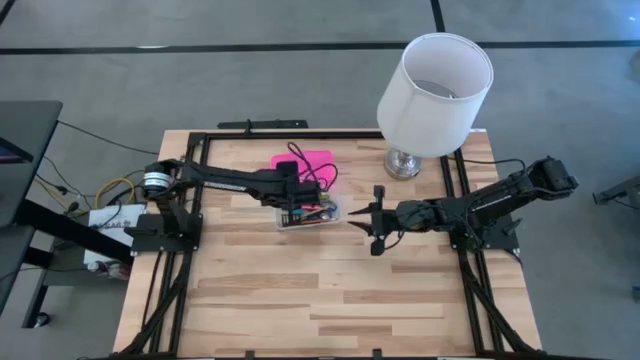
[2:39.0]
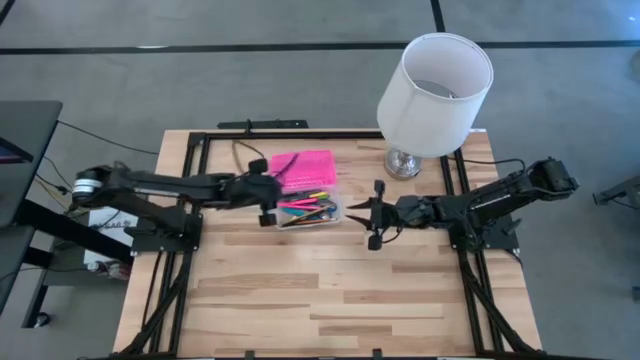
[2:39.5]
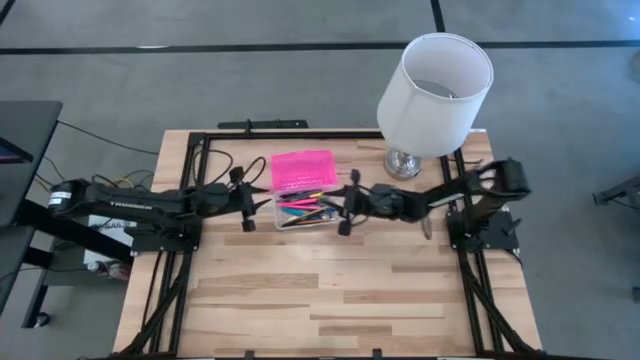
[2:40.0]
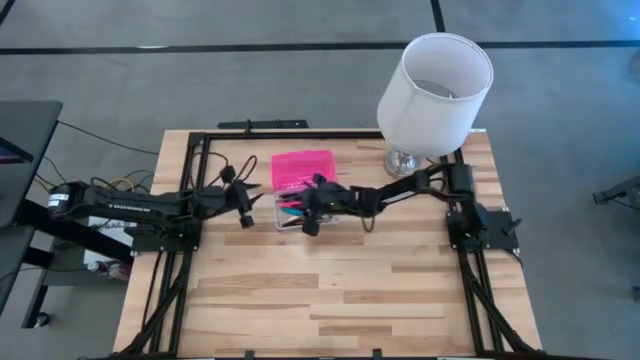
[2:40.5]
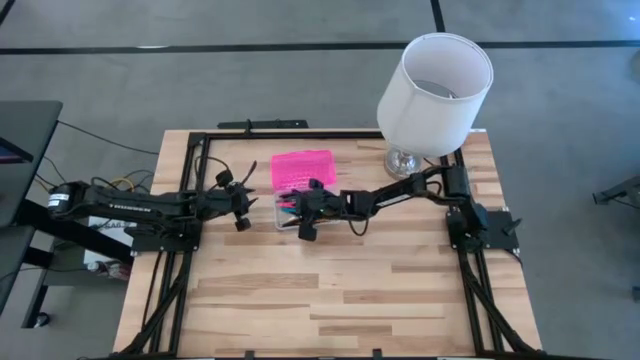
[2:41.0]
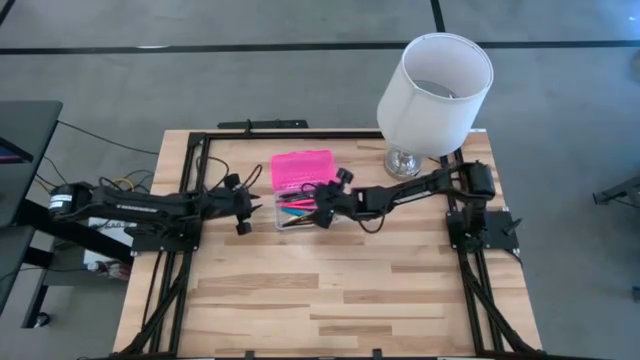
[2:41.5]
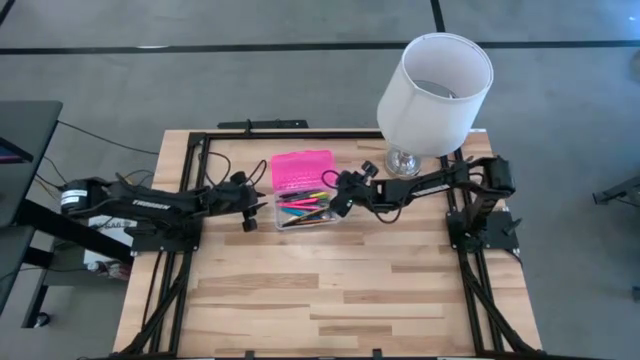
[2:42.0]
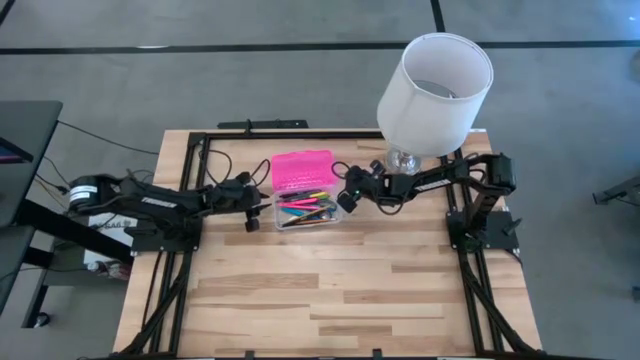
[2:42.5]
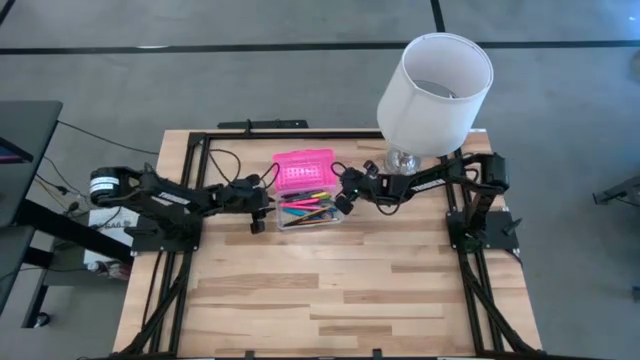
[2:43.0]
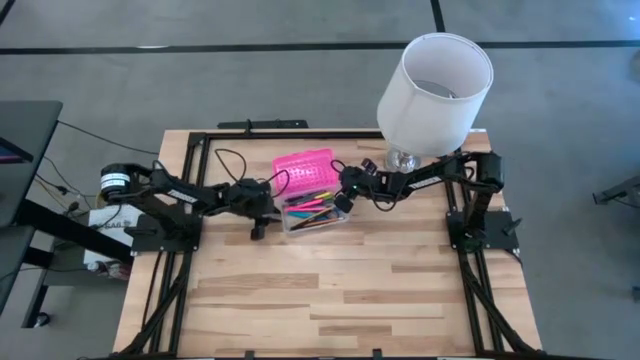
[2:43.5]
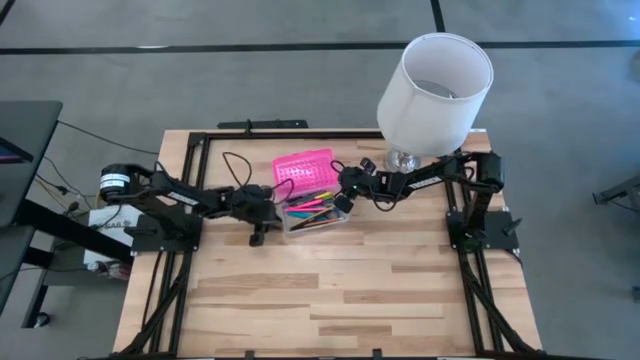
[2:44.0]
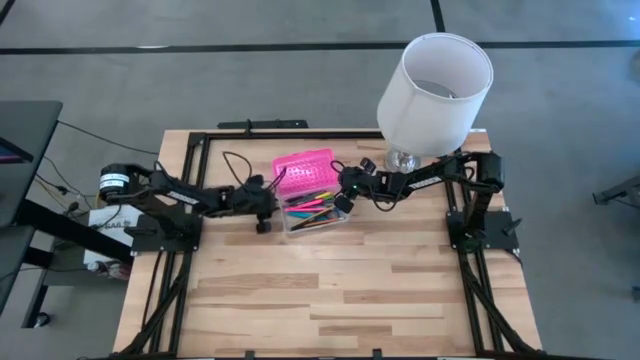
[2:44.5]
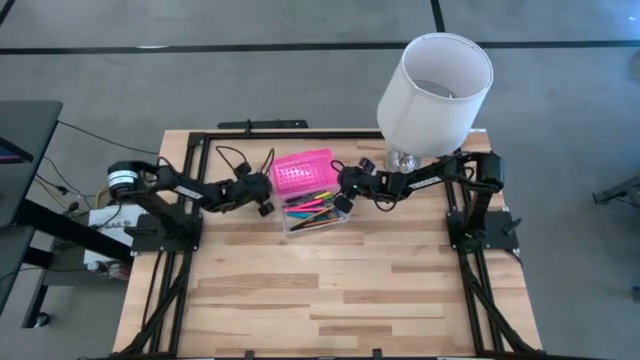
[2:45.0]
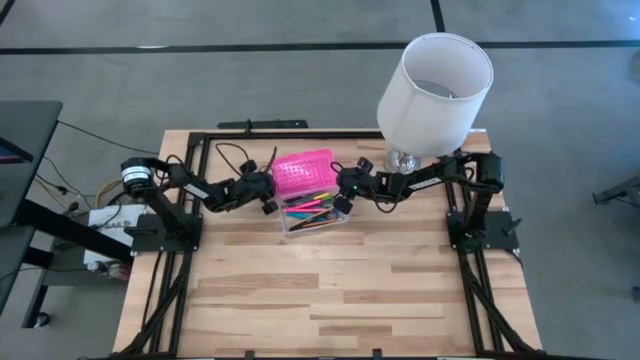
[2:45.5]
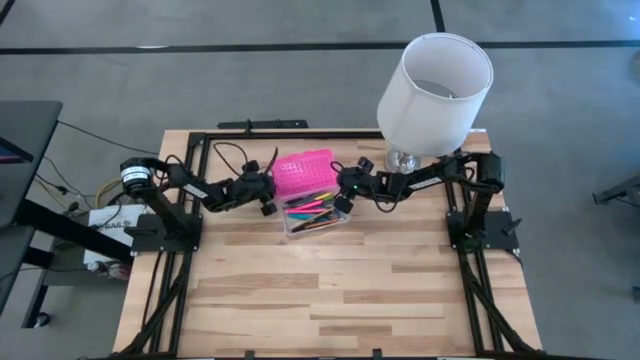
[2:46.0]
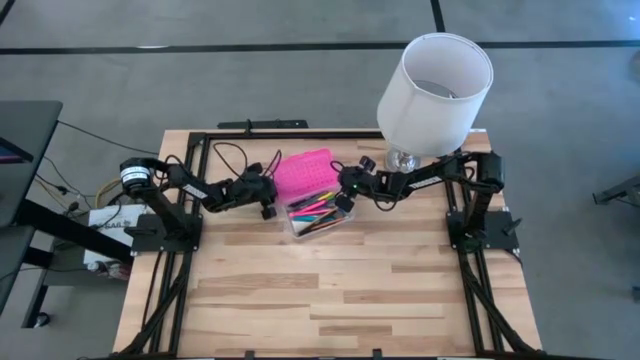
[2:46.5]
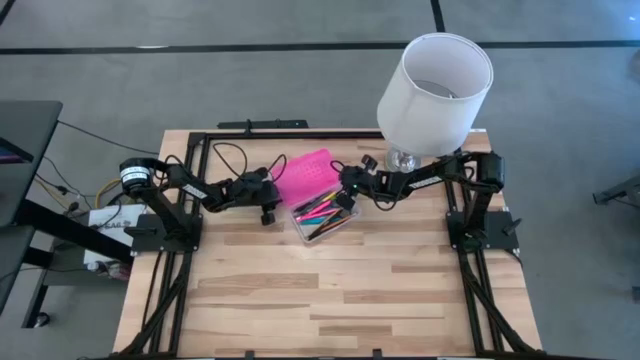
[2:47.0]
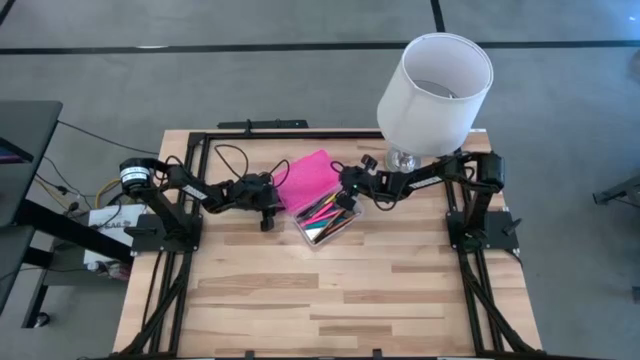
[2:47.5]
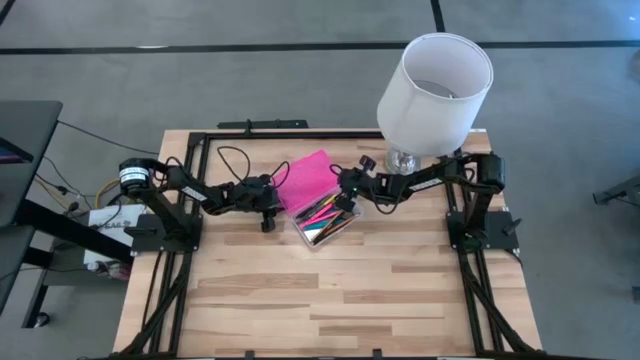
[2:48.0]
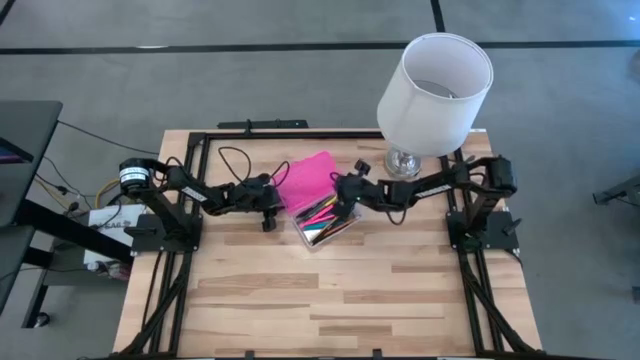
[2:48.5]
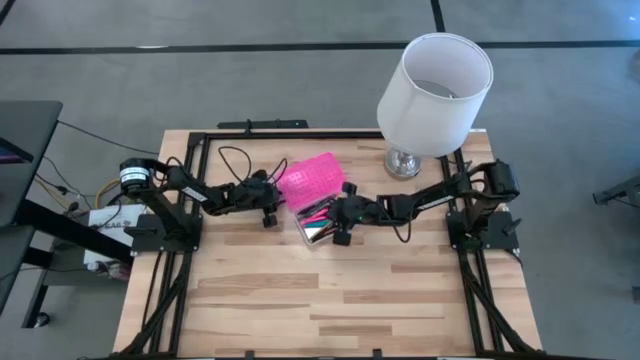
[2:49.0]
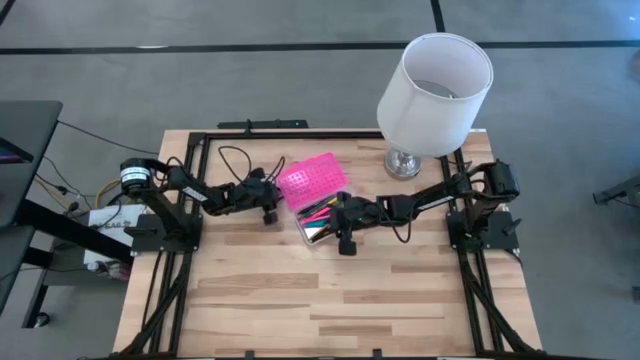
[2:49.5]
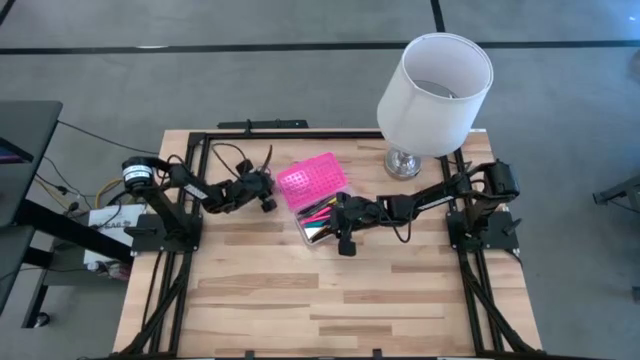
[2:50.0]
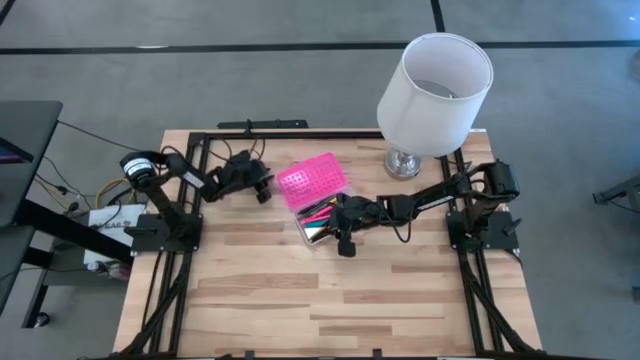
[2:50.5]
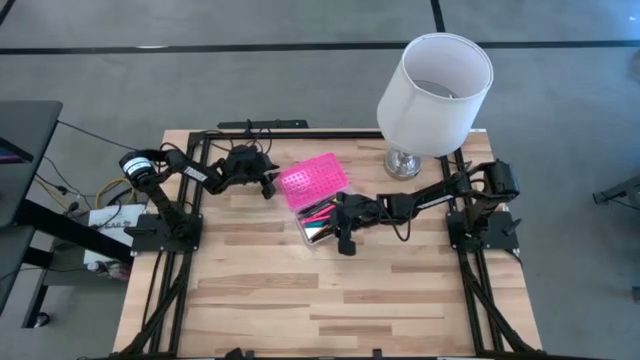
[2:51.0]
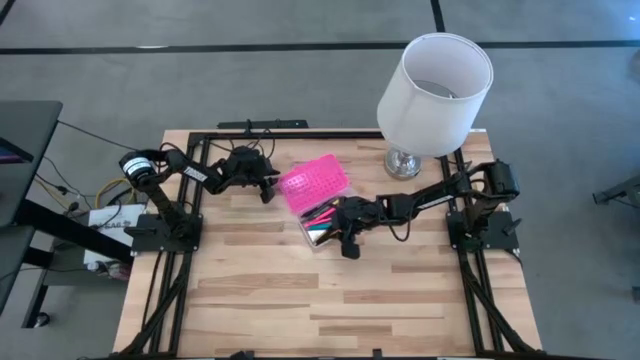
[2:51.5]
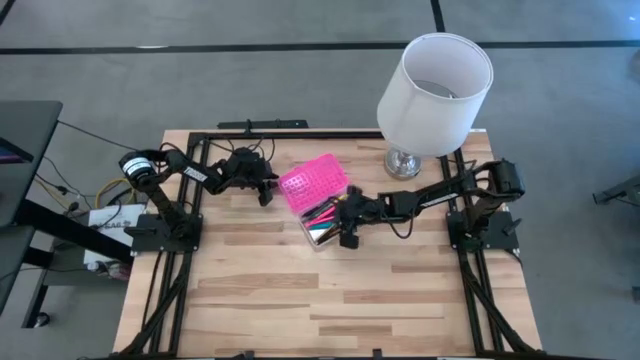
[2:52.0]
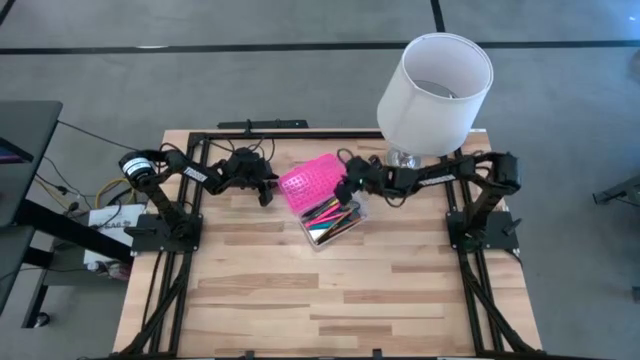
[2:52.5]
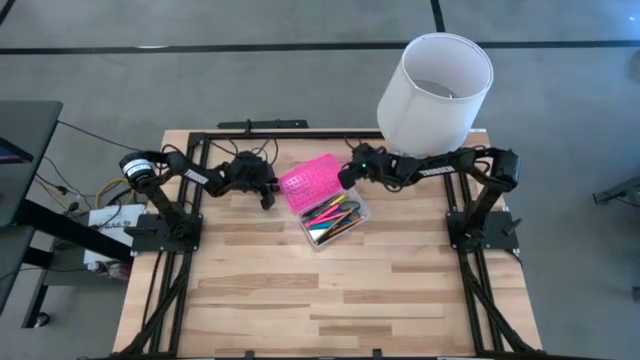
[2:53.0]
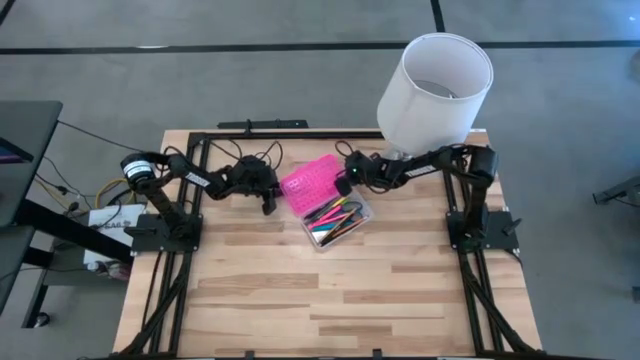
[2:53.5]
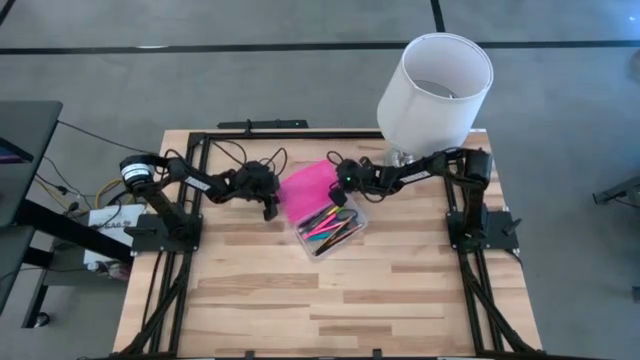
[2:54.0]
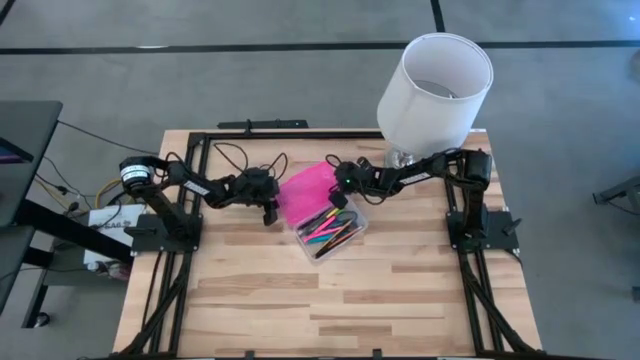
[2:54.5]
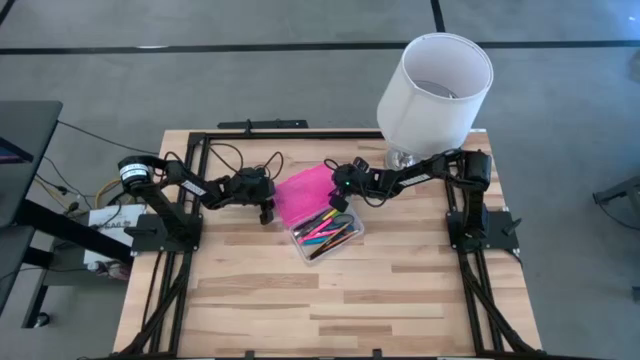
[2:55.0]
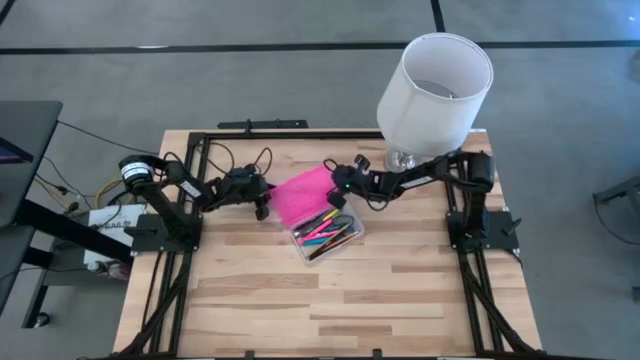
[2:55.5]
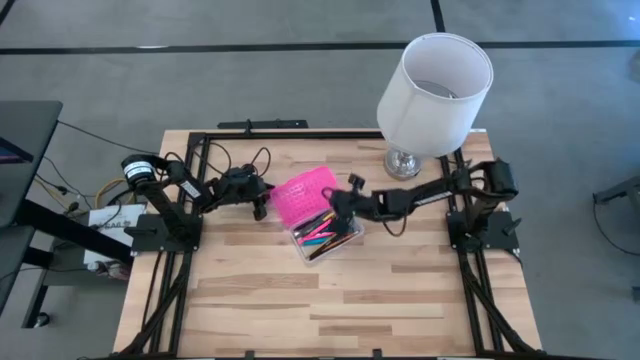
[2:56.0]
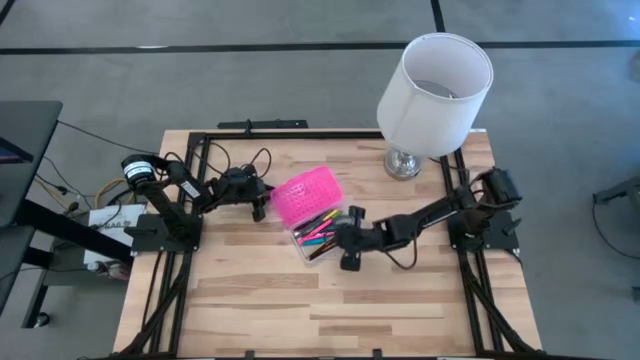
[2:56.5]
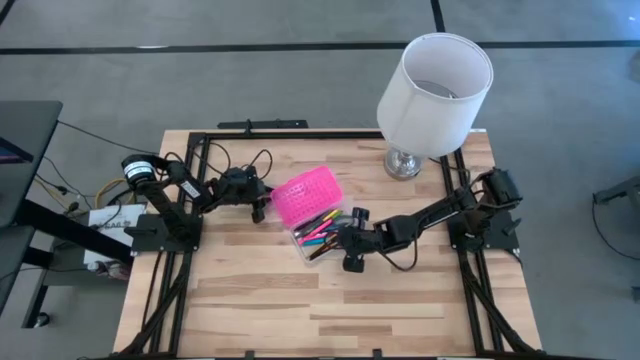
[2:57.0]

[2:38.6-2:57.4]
Task: Pick & place school supplies into a supply box
Close the pink supply box

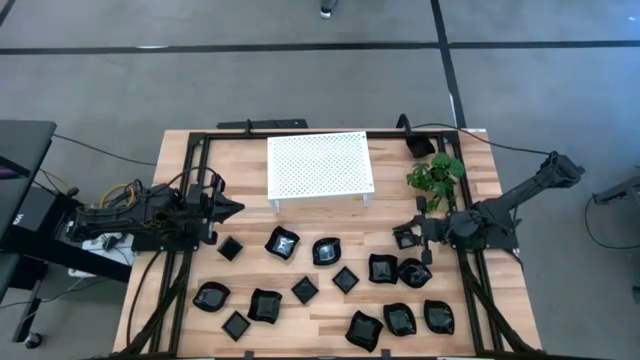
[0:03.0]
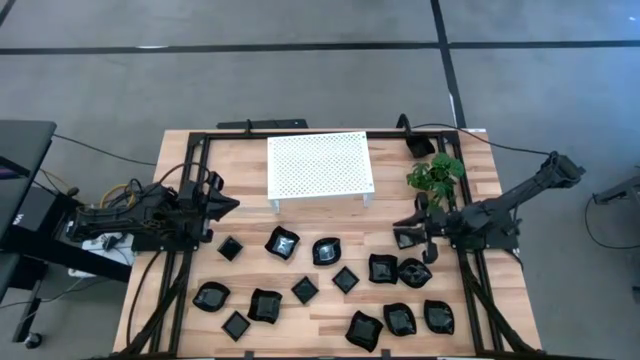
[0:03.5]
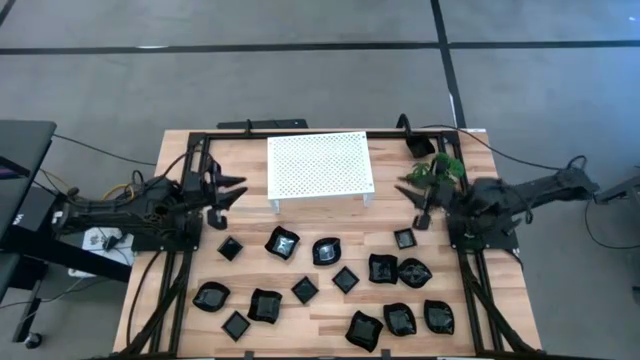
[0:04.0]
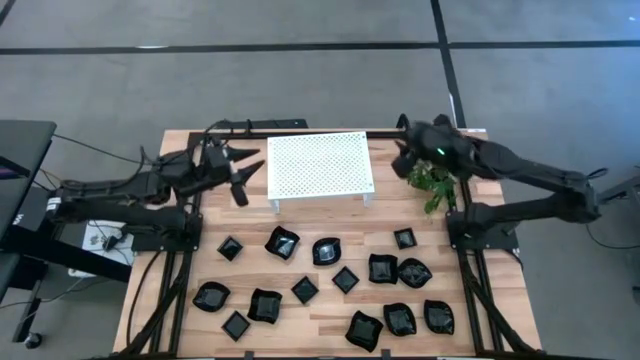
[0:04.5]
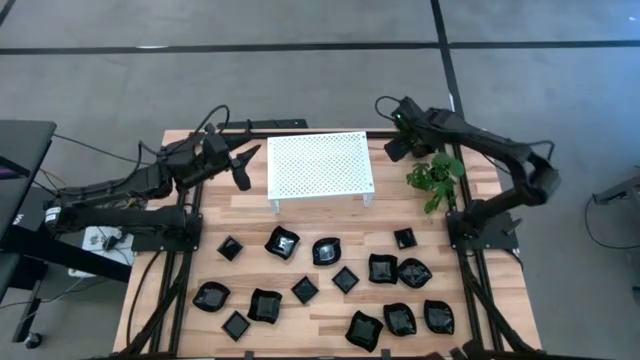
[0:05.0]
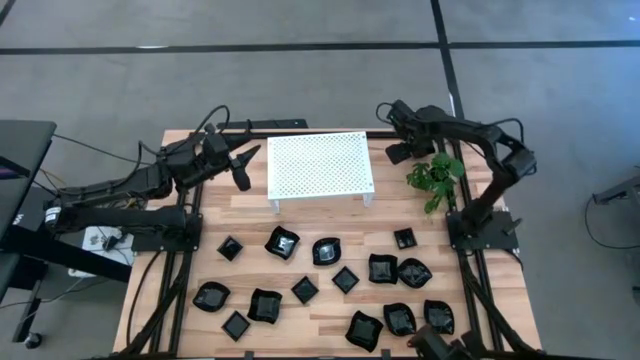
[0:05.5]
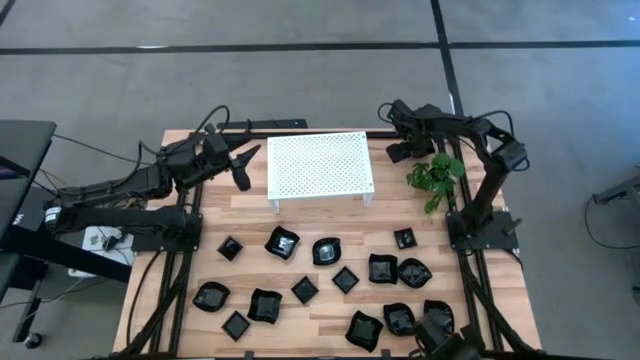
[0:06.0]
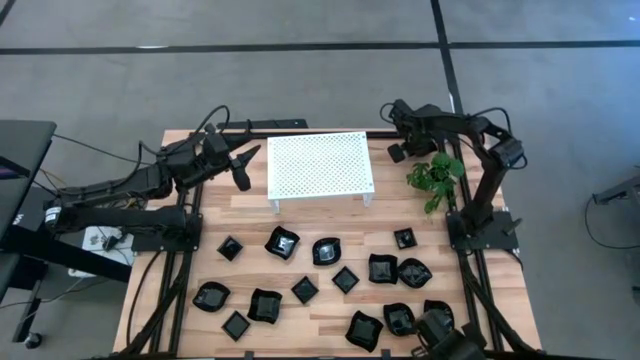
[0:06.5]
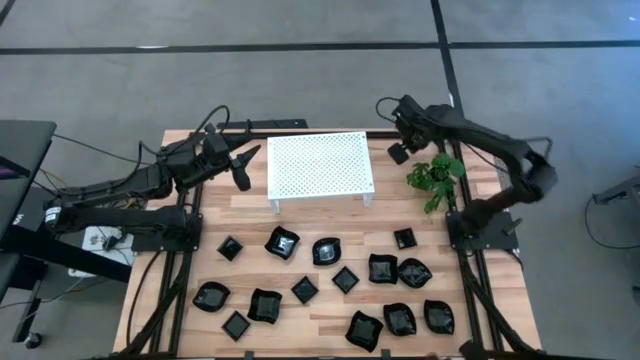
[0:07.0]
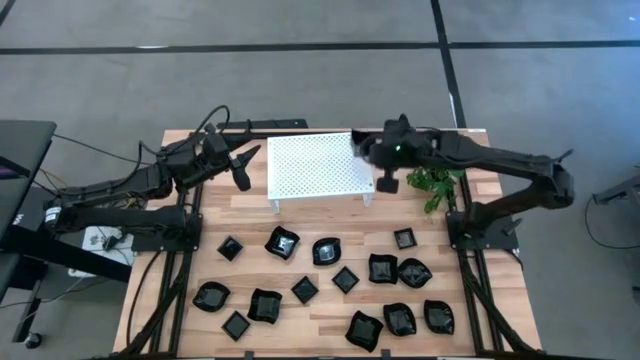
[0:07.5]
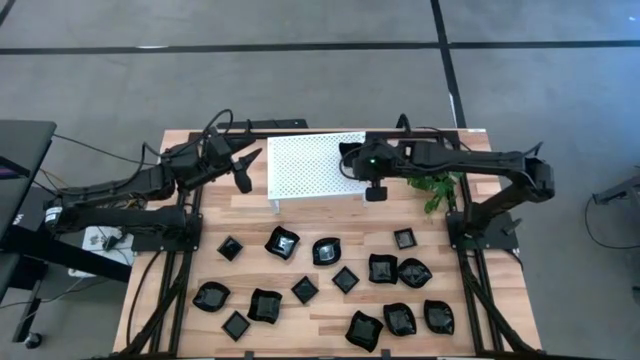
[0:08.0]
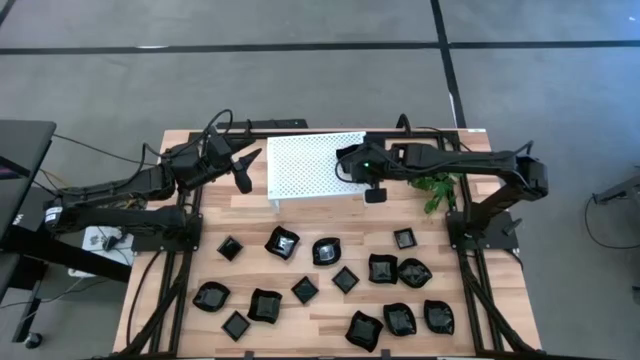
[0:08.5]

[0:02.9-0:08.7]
Task: Pick & Place Mini shaped plates
Put the distorted square plate on the shelf
